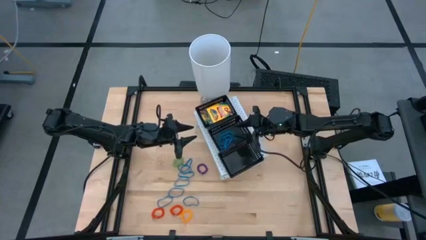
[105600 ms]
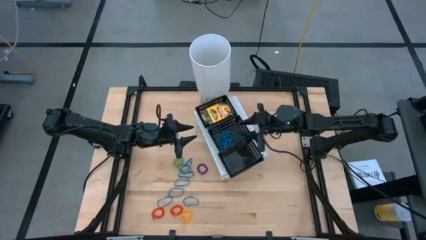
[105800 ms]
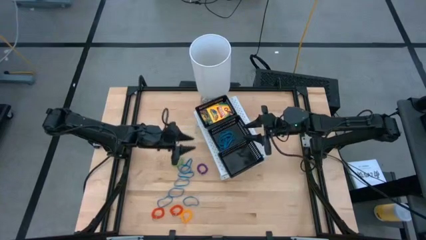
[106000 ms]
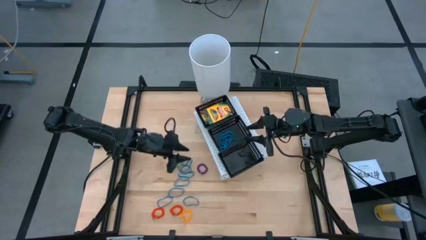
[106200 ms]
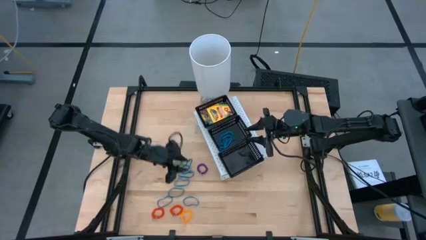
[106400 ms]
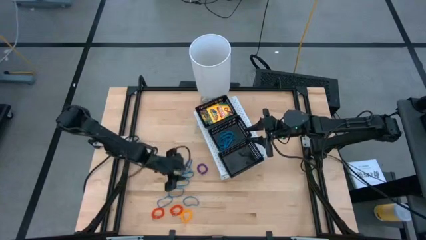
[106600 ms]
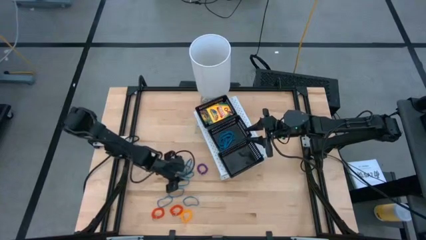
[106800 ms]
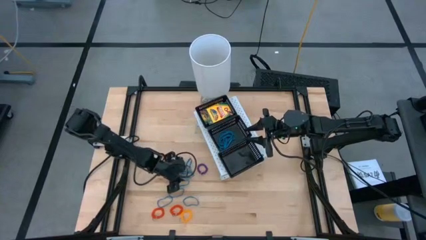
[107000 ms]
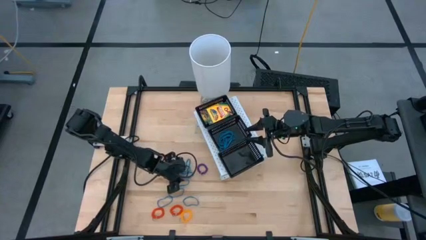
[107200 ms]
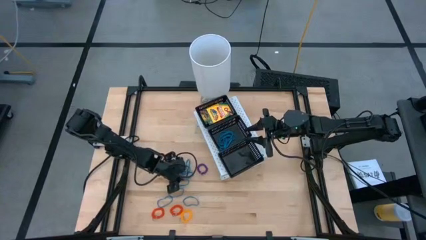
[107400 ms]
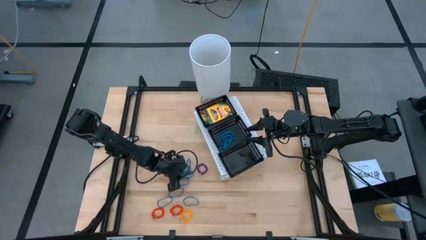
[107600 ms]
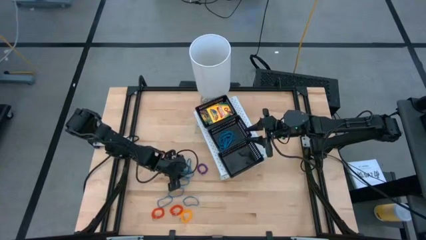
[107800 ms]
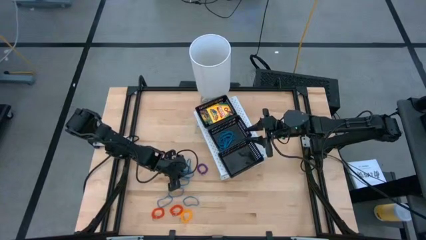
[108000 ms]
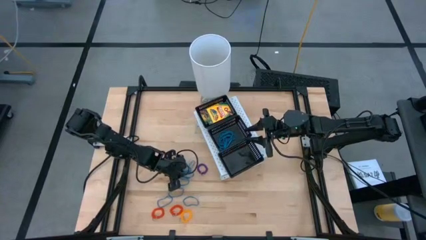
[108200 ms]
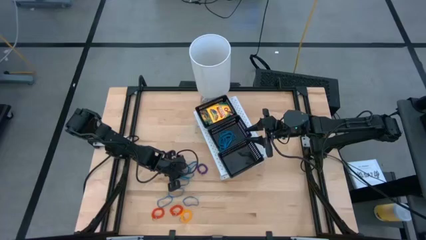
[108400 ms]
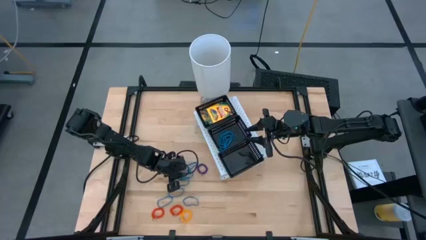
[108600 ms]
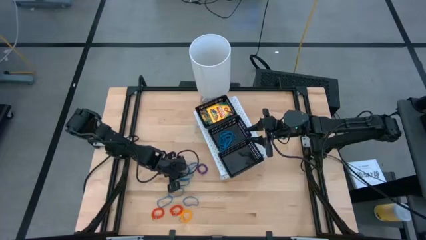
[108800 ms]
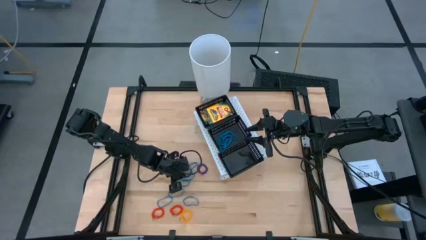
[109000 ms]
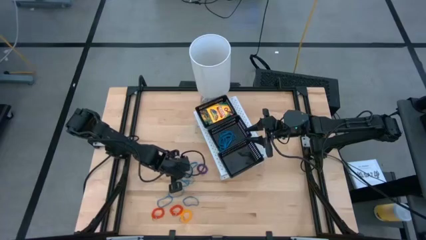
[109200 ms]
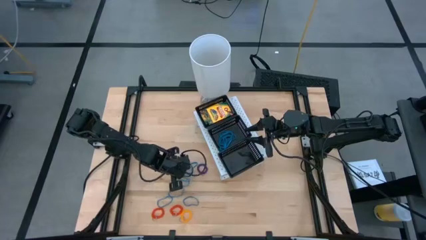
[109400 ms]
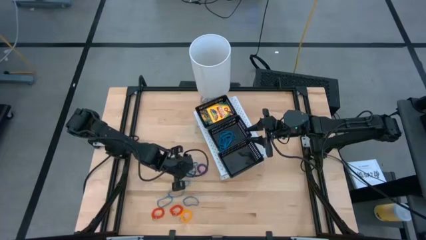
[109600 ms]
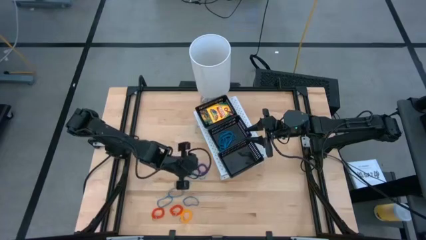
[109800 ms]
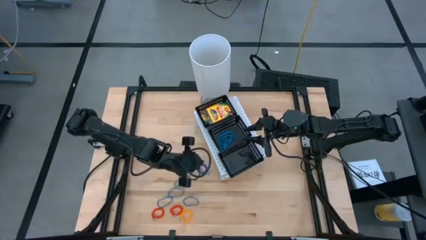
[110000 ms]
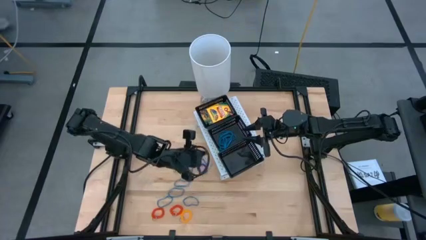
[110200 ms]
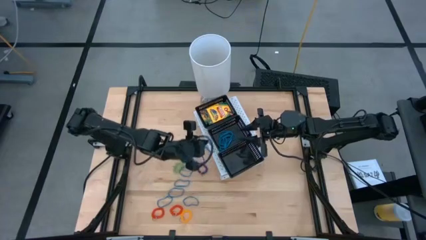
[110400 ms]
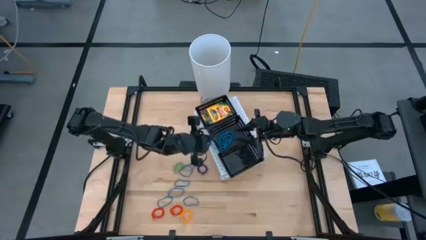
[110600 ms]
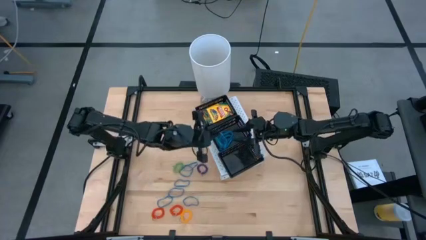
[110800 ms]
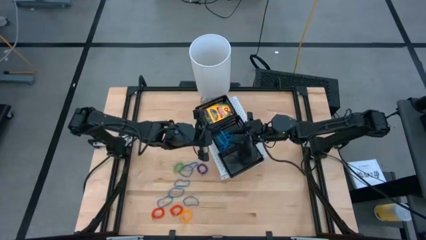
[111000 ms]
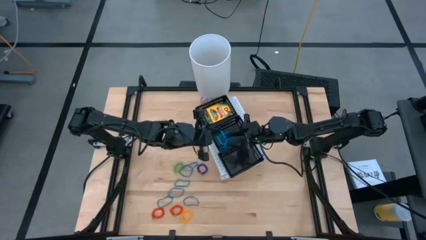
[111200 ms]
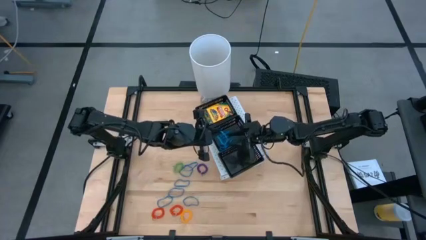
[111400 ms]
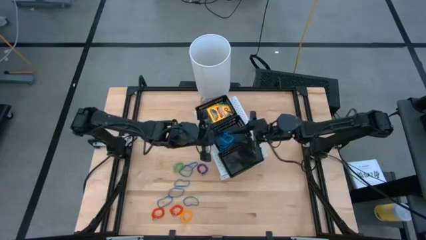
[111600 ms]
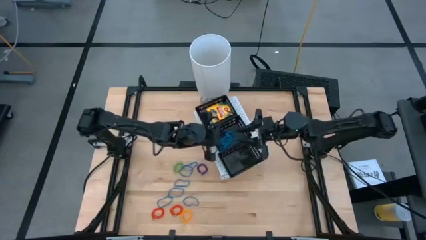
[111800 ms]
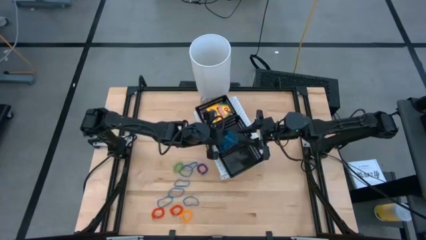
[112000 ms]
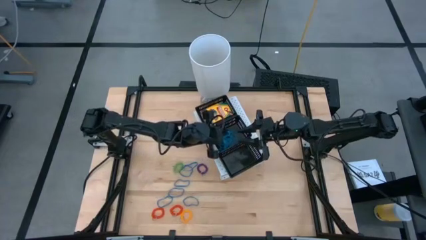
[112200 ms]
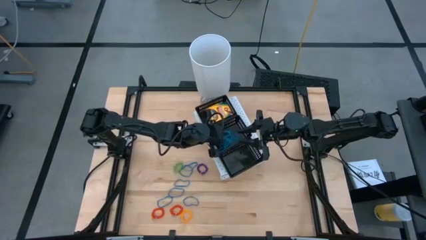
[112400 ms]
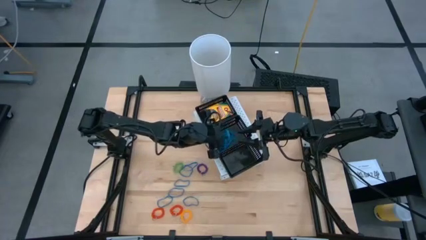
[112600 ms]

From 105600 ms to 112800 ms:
Task: Pick & Place Office Desk Supplies
Put the blue rubber band into the middle black bin on the shelf

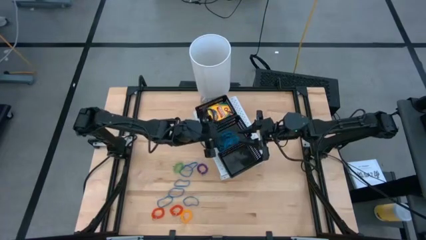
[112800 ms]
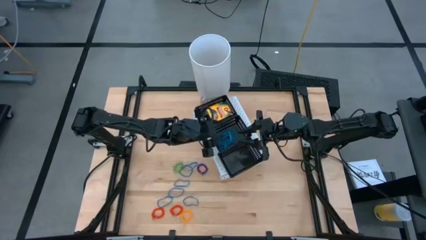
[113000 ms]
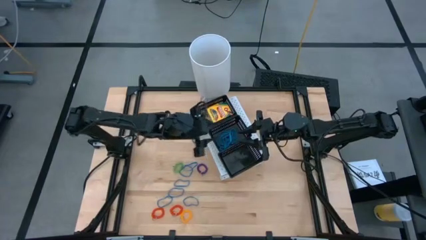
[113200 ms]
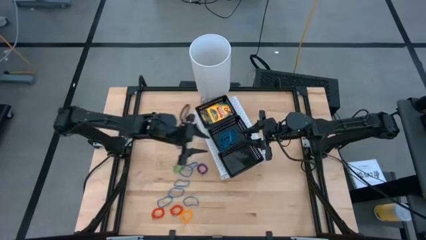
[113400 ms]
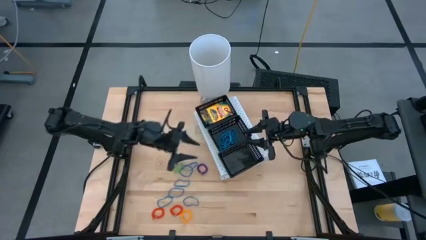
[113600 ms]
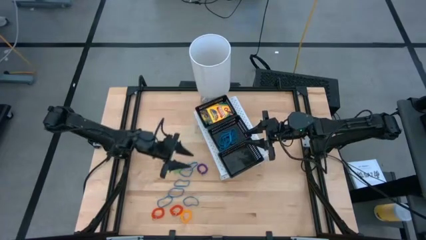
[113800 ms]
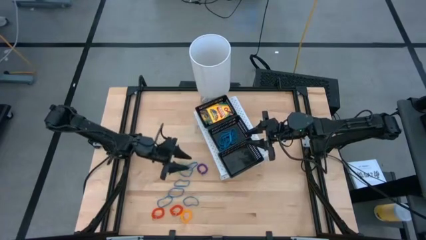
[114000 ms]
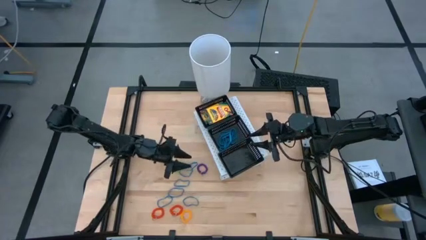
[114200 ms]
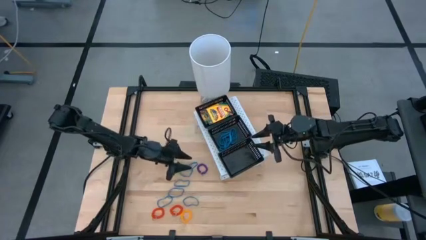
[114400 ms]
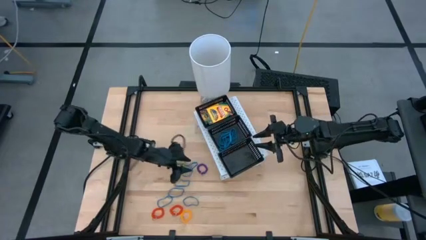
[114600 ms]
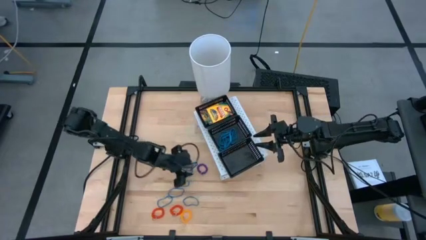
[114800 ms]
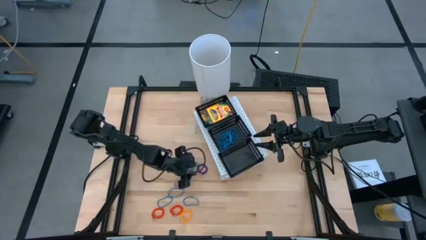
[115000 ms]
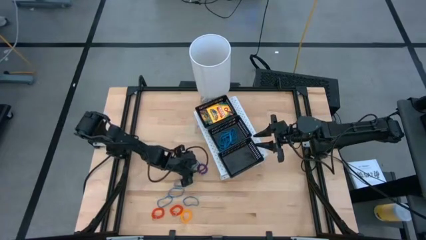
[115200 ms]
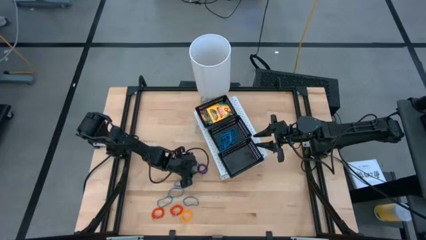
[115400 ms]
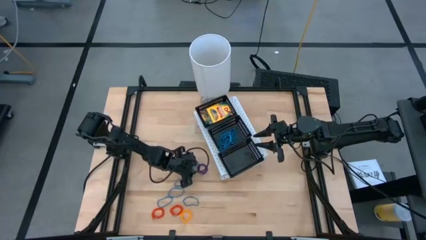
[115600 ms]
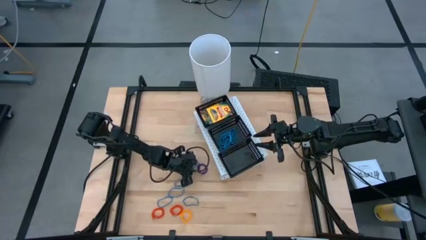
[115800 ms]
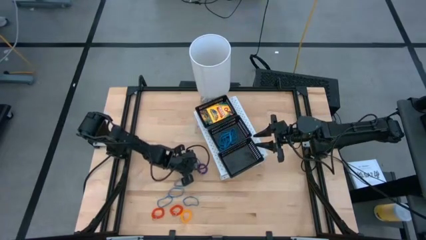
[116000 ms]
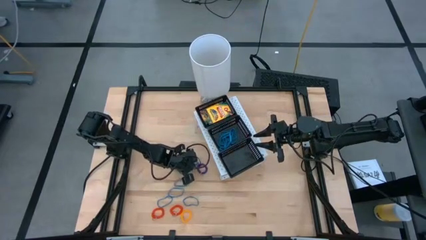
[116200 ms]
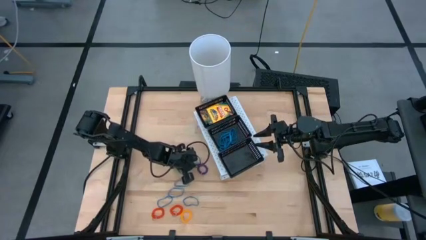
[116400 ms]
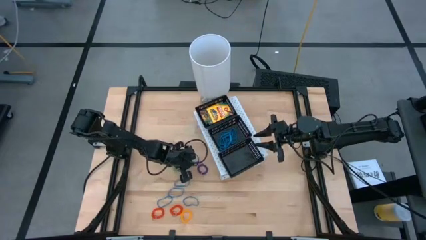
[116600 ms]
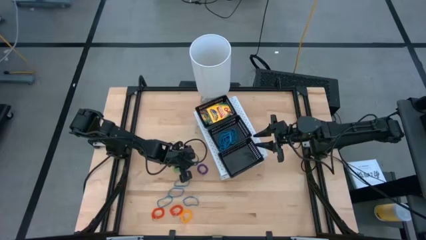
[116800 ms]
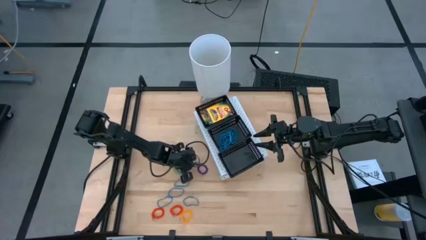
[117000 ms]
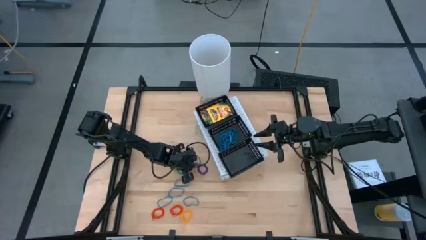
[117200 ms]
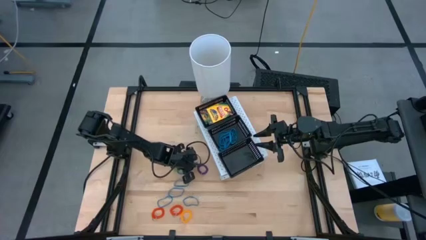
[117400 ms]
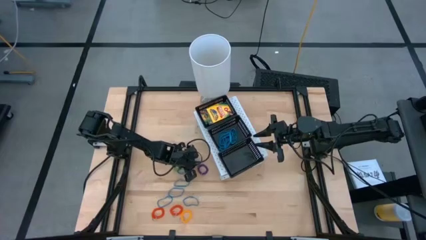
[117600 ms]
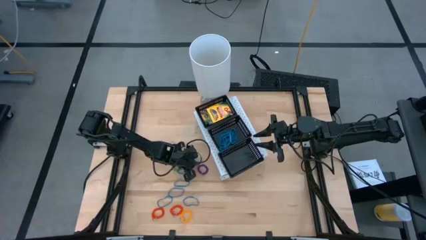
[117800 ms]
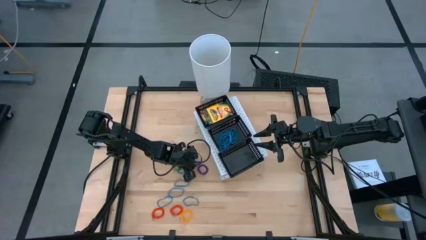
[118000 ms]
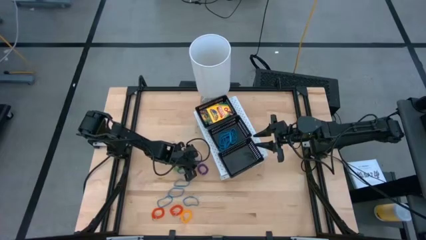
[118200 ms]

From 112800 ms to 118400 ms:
Put the blue rubber band into the middle black bin on the shelf

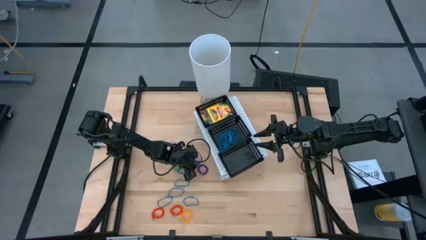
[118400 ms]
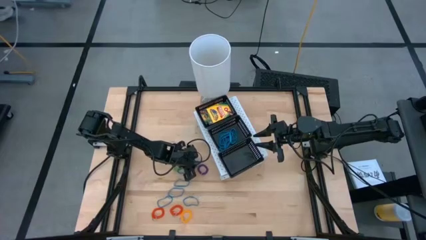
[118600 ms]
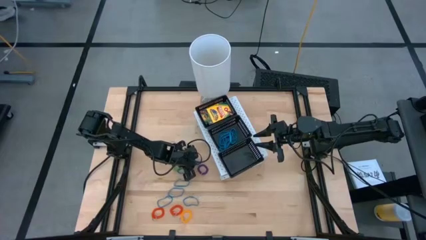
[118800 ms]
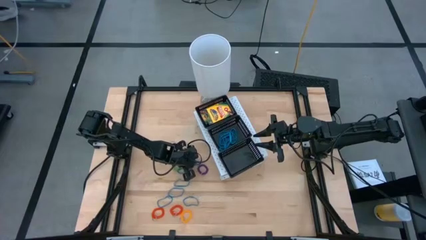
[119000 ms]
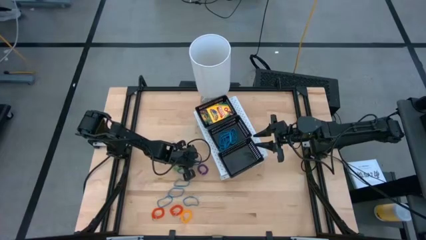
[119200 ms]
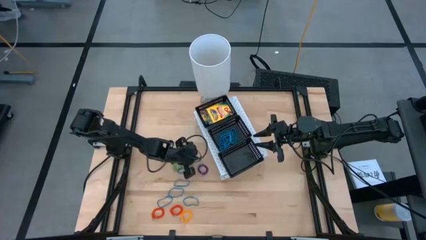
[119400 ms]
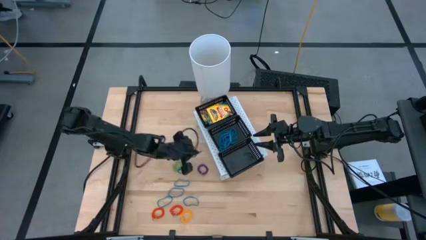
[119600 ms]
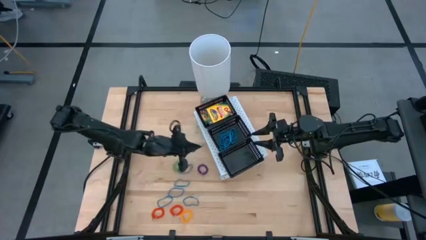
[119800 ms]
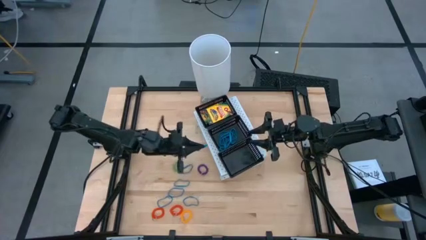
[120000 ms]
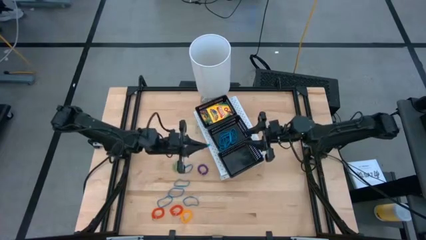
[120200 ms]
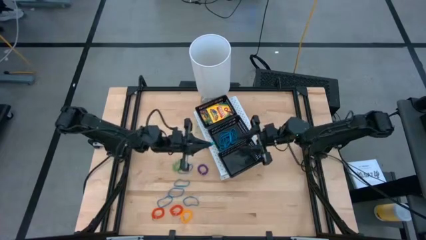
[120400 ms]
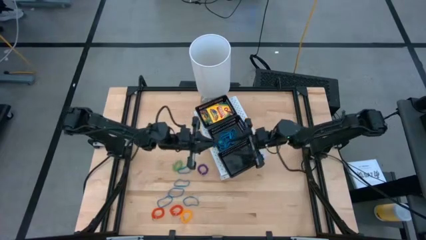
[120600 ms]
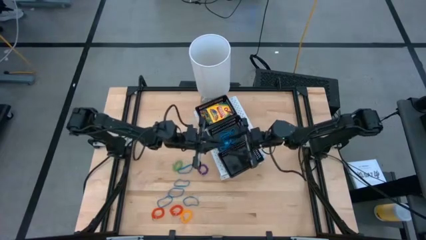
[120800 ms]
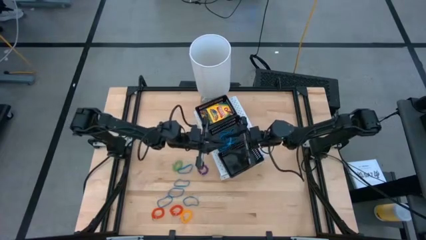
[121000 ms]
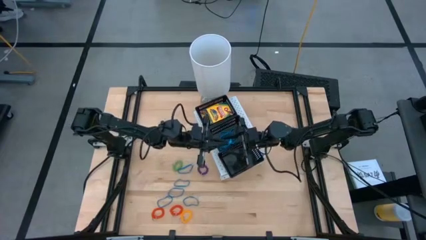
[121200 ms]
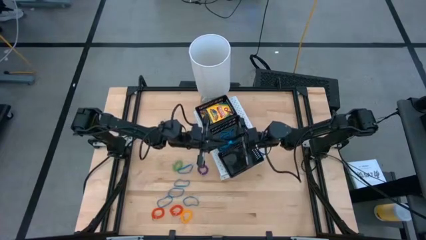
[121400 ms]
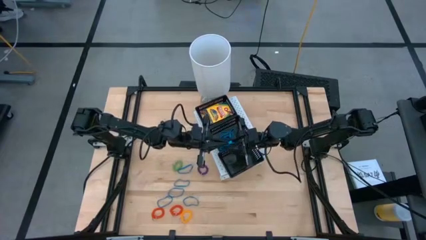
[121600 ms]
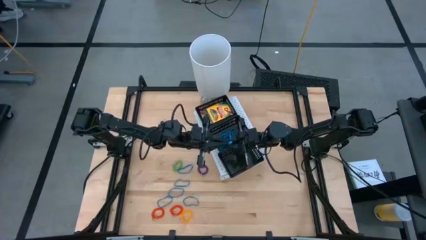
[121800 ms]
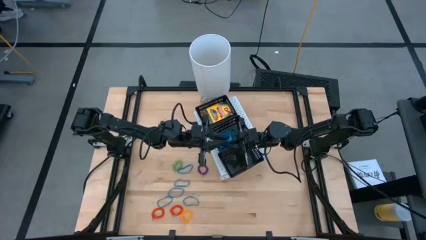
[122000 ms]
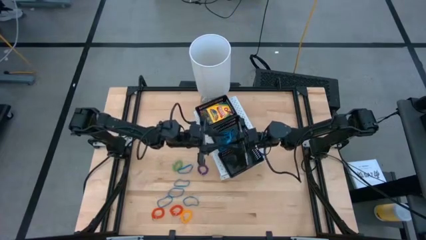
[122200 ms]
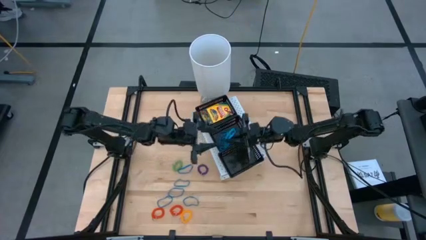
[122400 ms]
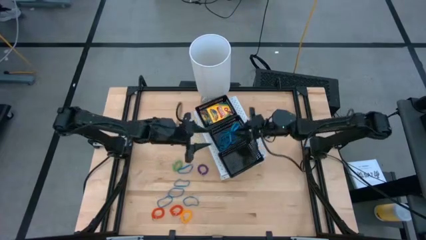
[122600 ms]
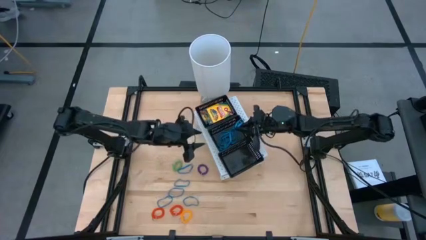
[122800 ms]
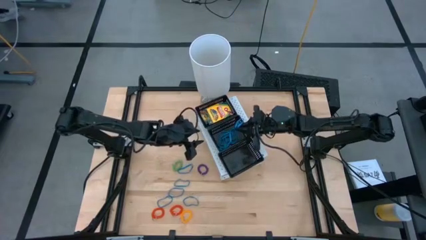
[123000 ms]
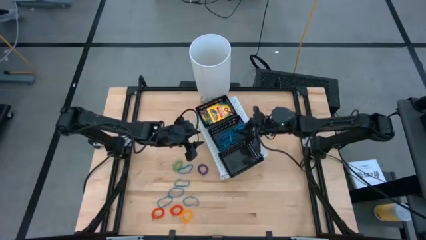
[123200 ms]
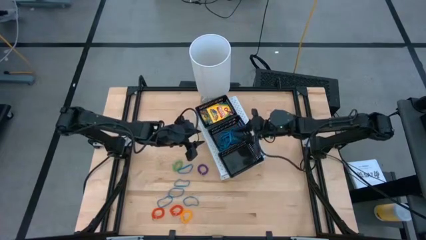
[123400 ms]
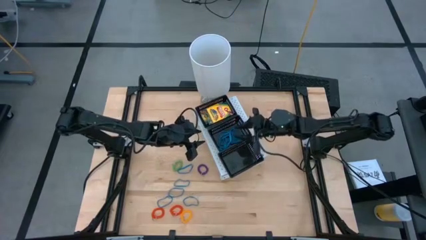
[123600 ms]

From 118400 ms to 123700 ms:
Put the blue rubber band into the middle black bin on the shelf
